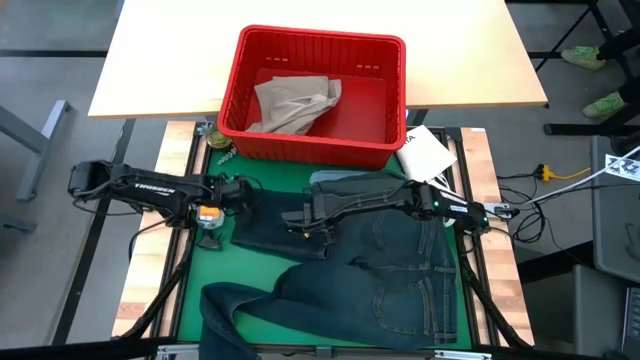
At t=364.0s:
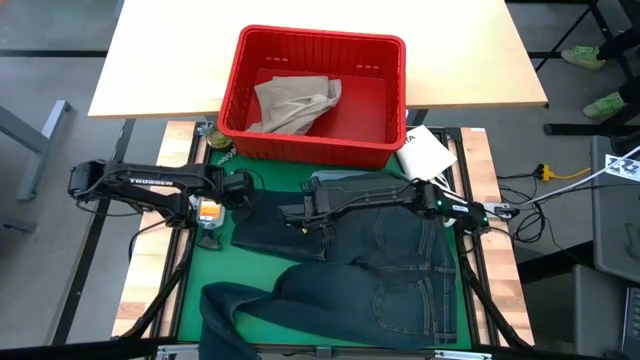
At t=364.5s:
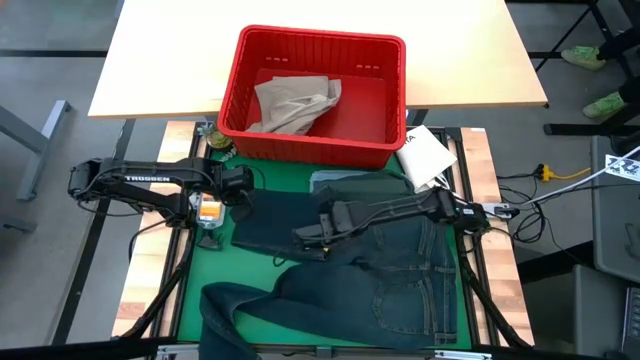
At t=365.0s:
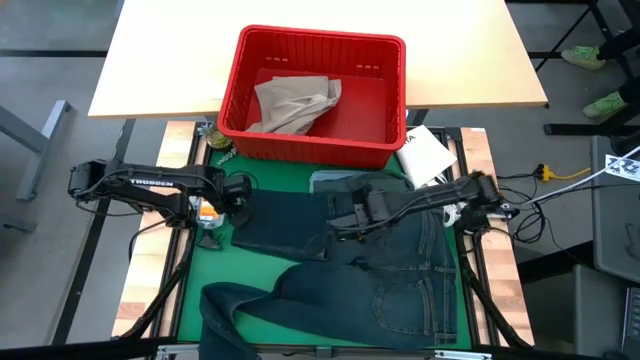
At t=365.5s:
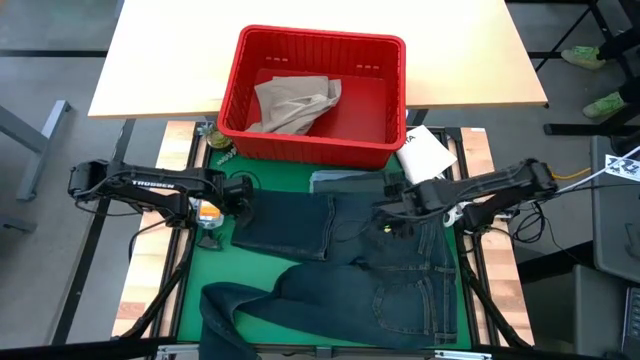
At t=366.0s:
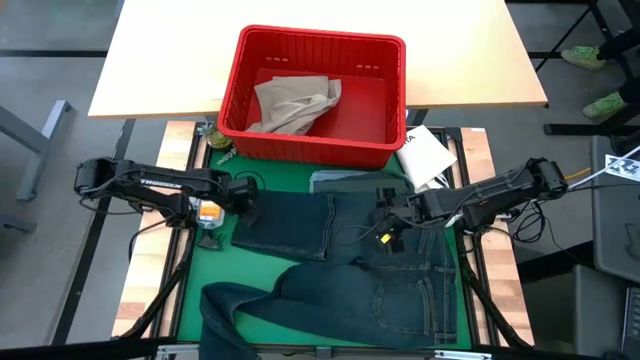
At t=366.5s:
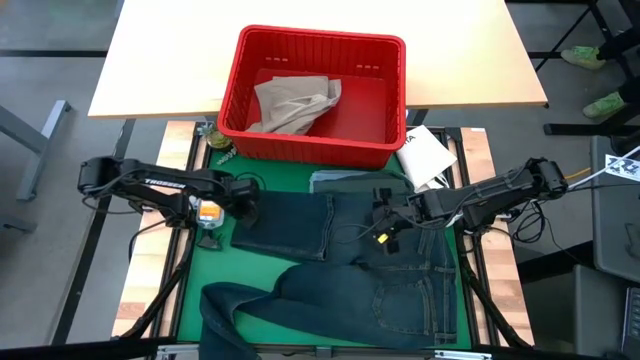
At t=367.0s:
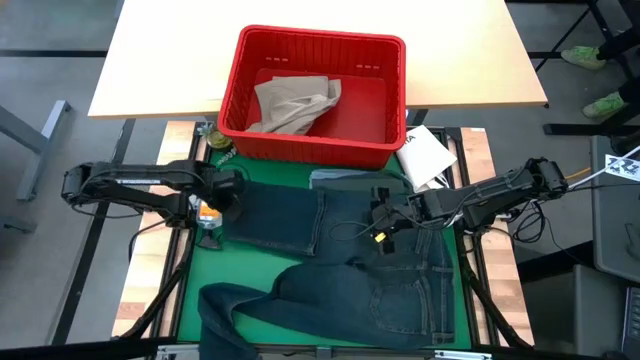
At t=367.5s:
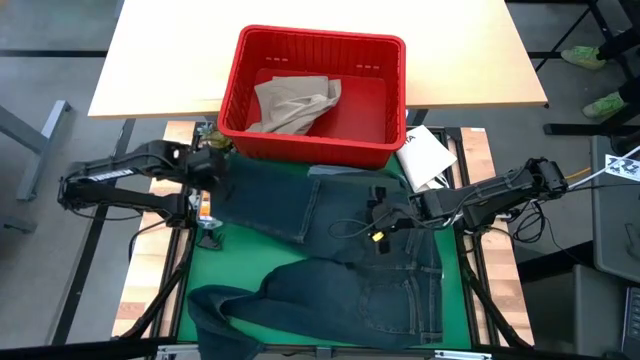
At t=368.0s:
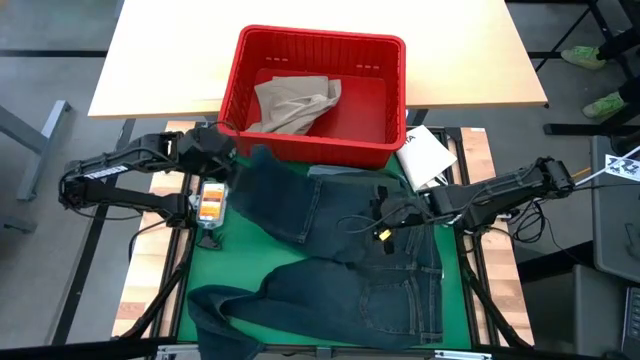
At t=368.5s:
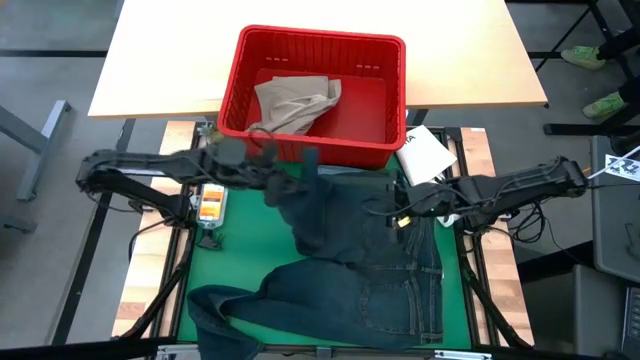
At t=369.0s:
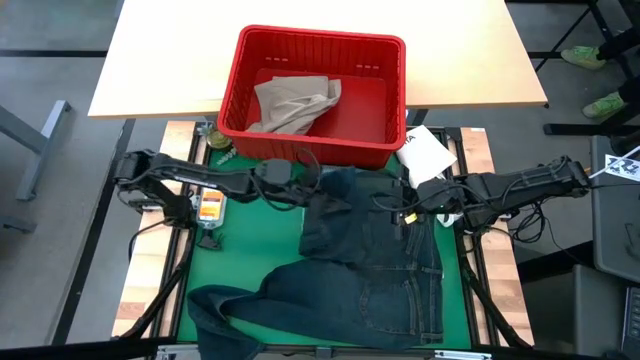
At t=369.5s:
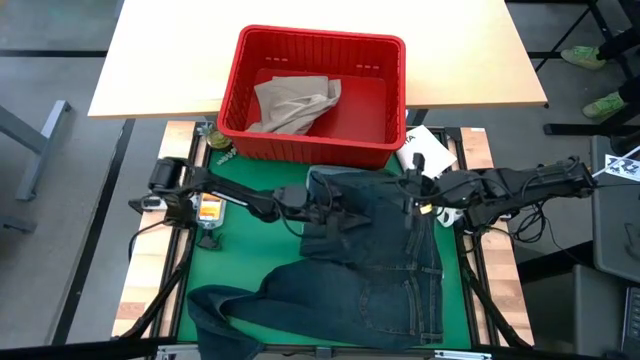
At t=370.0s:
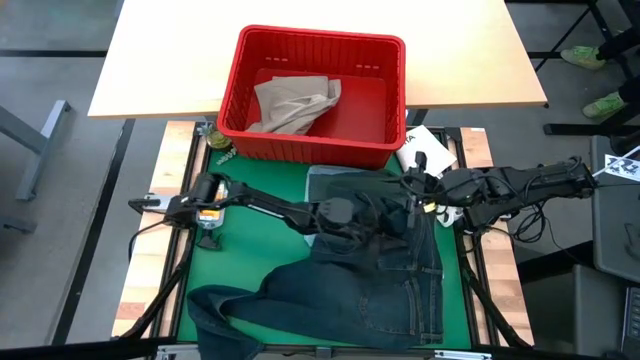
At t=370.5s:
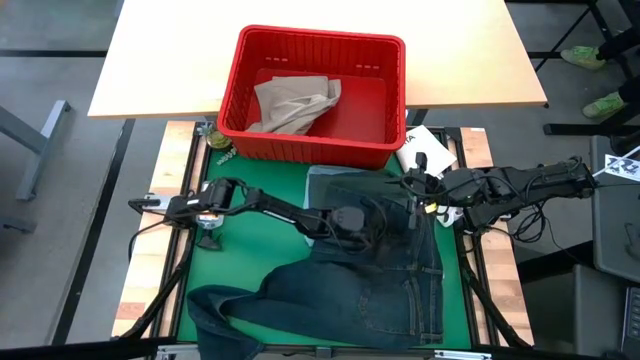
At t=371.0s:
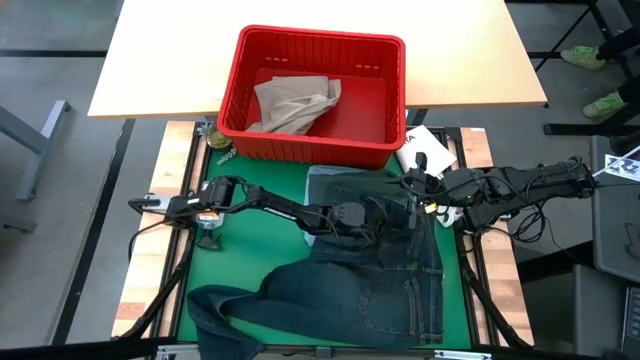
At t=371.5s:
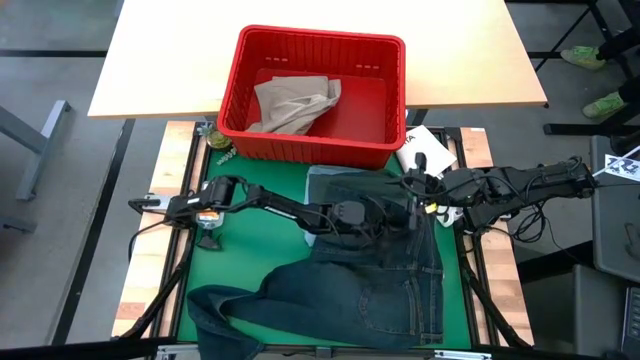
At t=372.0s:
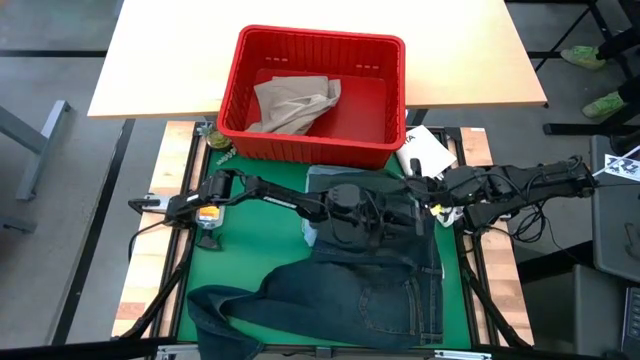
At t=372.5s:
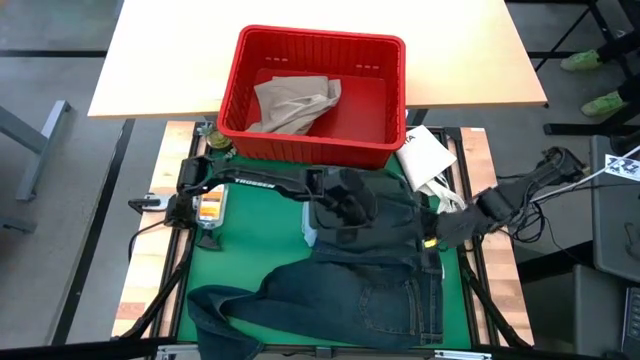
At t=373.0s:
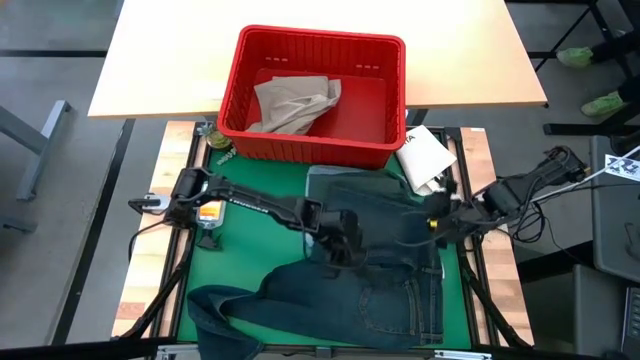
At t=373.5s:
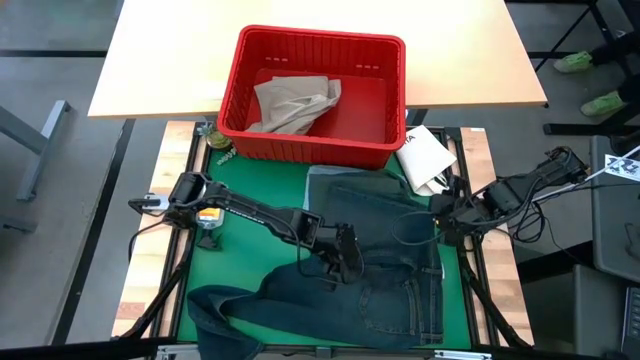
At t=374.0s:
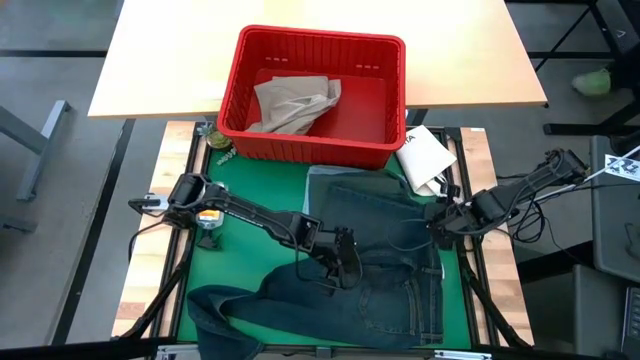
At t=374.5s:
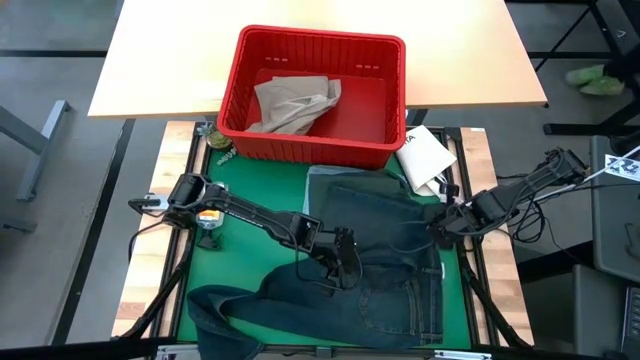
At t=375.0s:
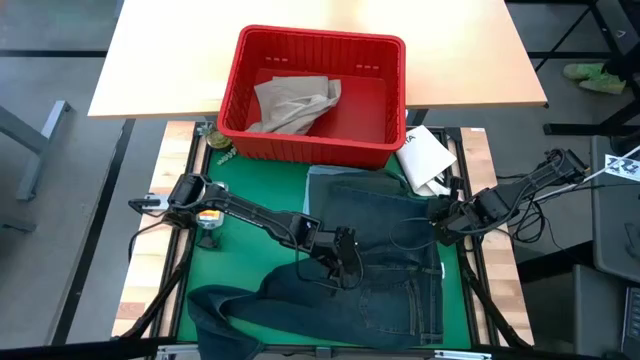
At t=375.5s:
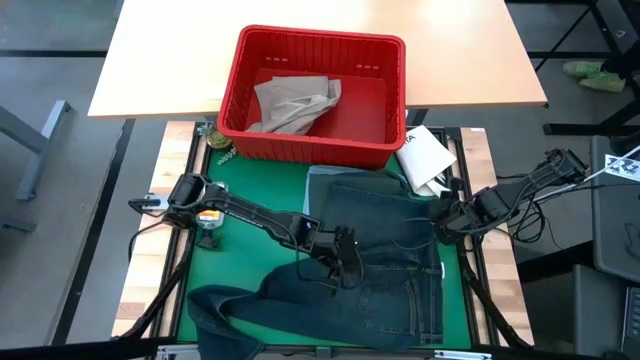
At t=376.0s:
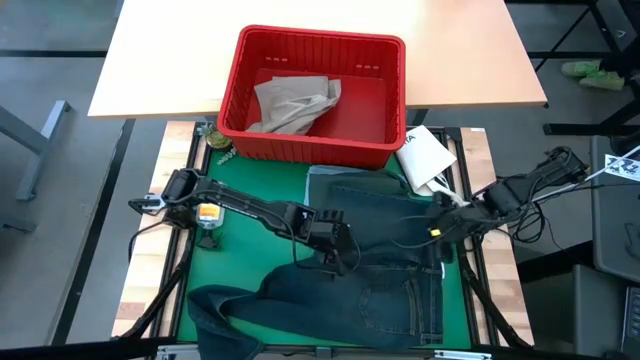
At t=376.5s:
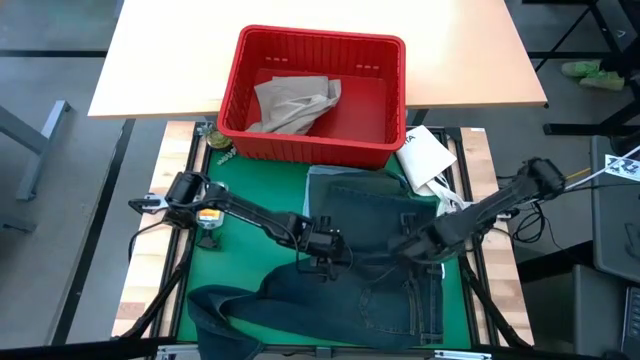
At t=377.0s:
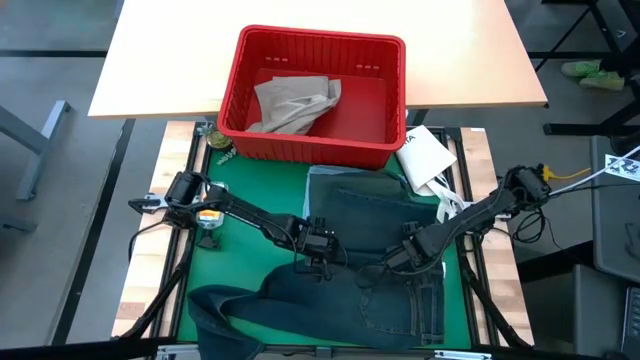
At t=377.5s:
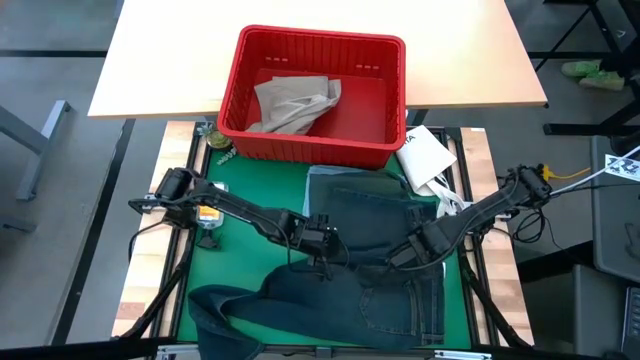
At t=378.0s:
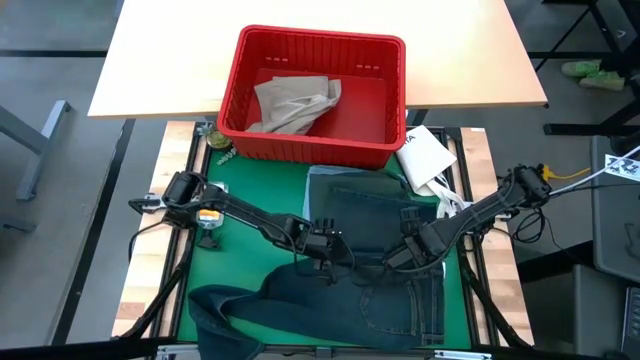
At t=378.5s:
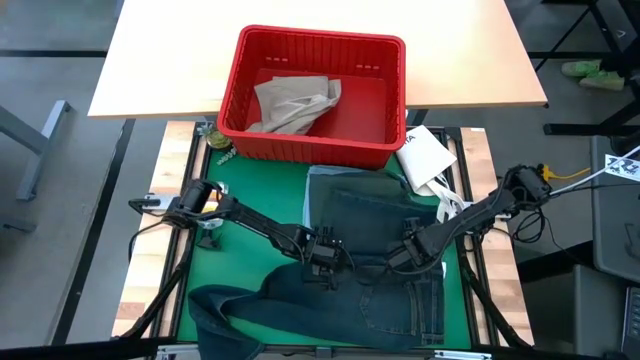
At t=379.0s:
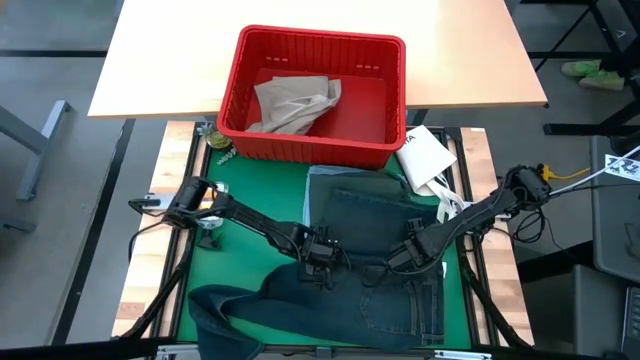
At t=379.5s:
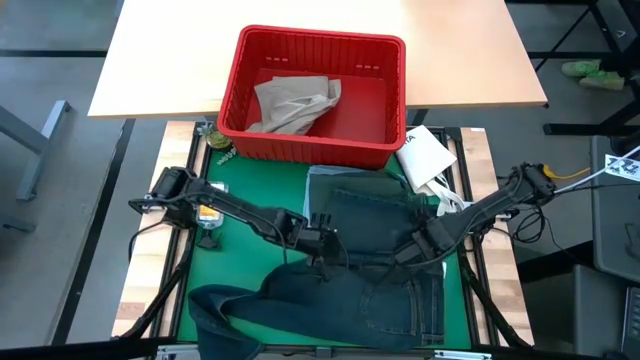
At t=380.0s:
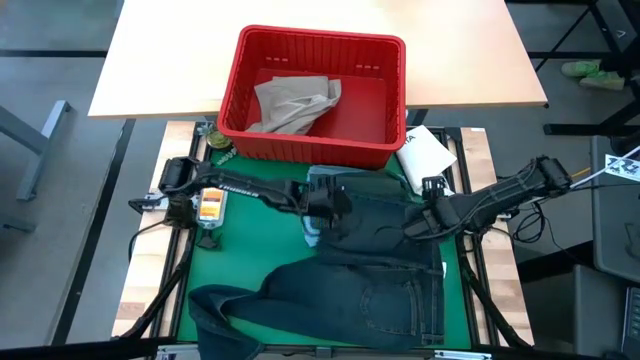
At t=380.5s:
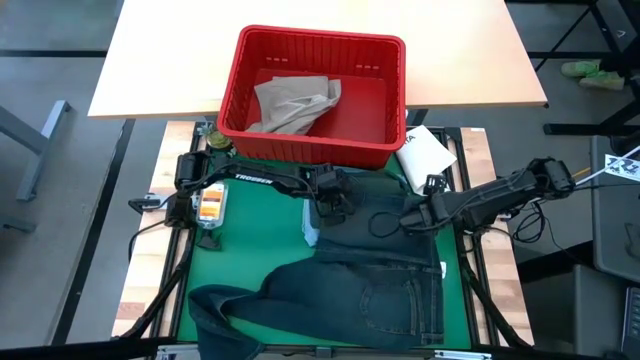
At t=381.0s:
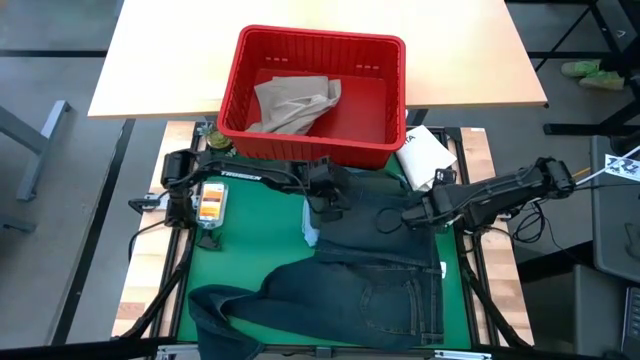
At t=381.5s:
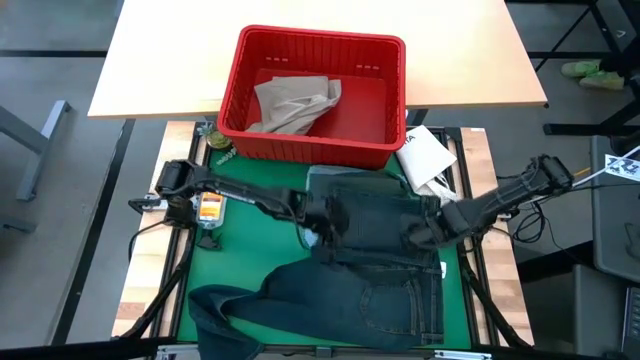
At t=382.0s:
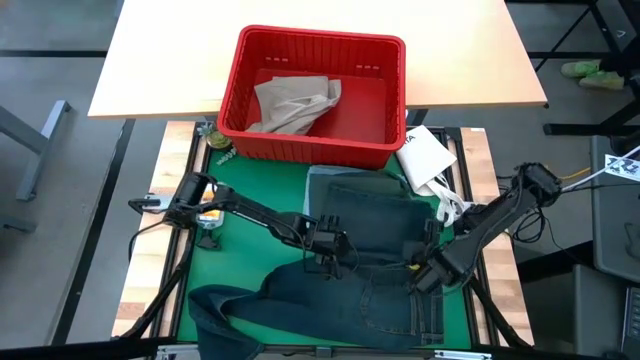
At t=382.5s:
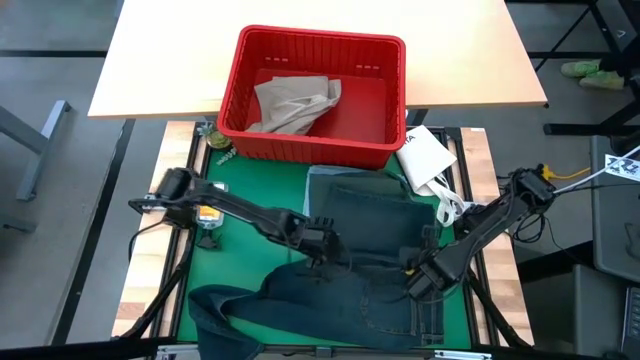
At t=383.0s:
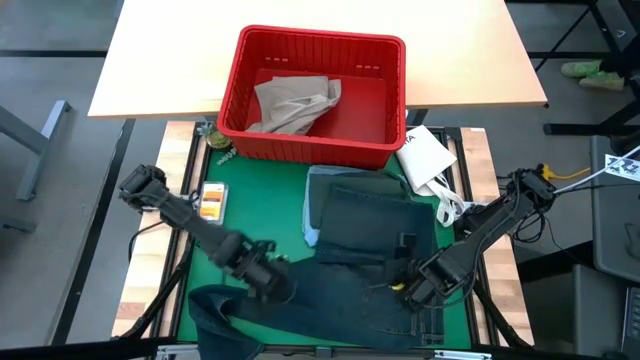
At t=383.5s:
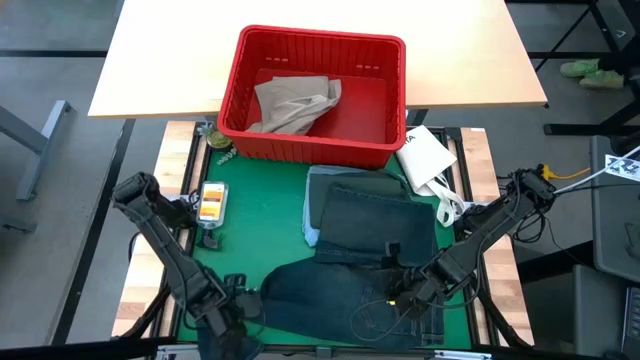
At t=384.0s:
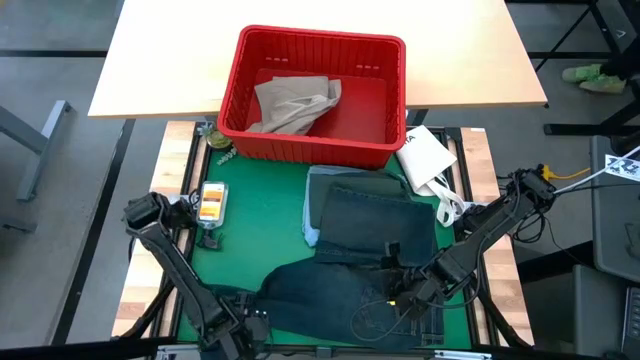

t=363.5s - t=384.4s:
Task: Fold Laundry from Bin
Fold the dark blue pants
